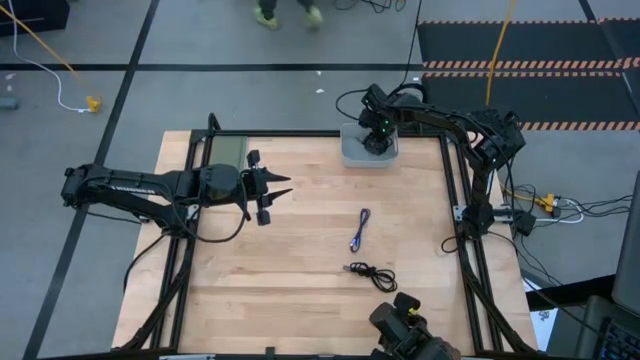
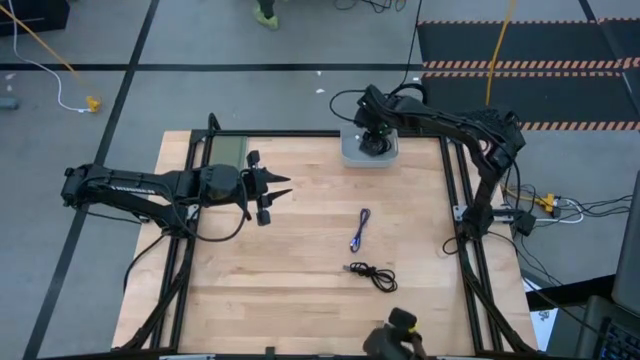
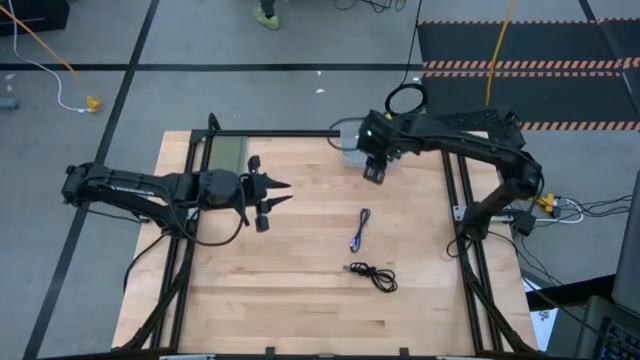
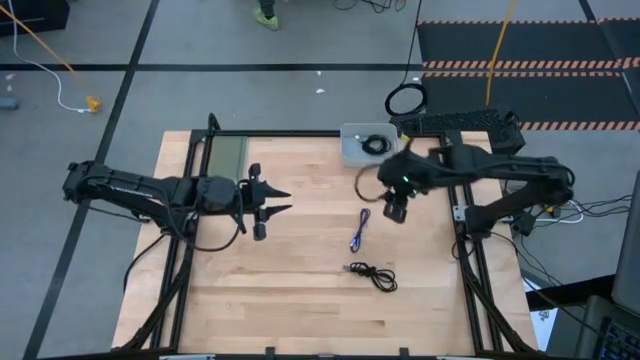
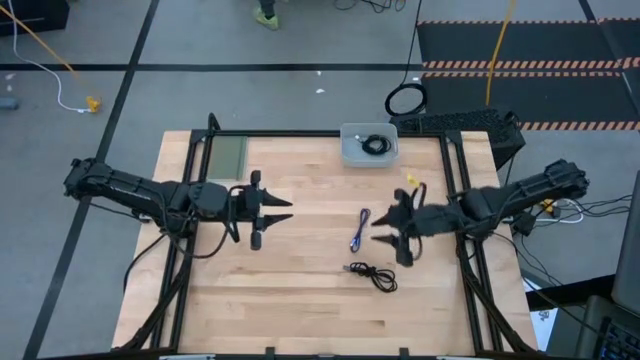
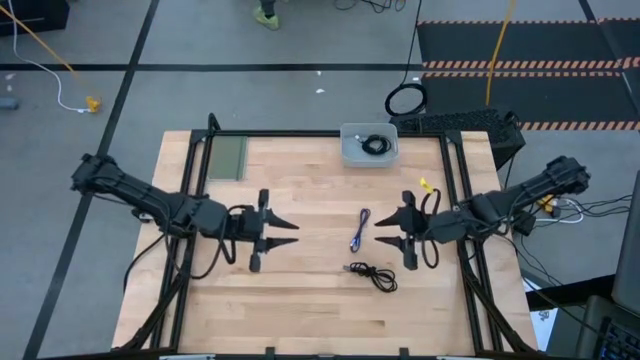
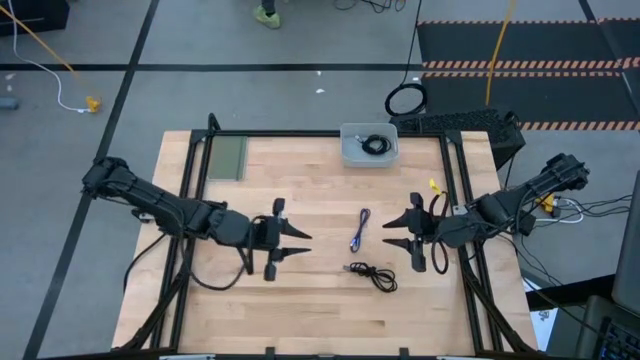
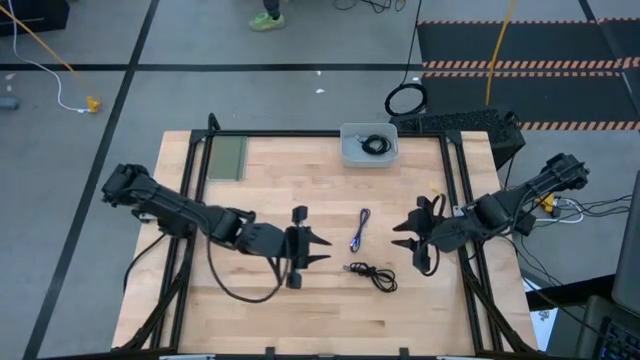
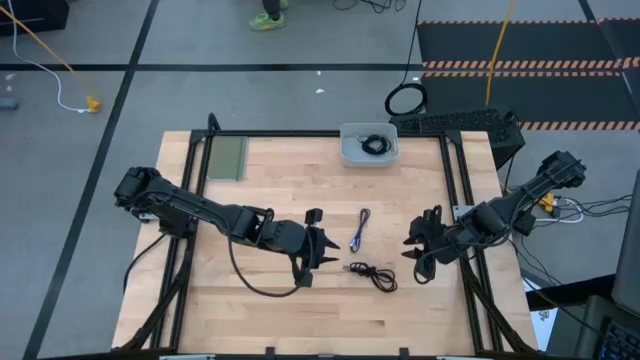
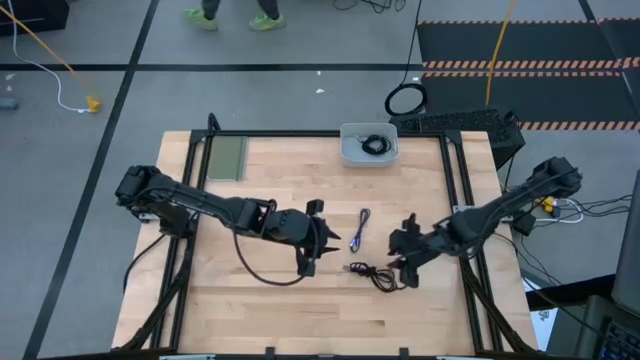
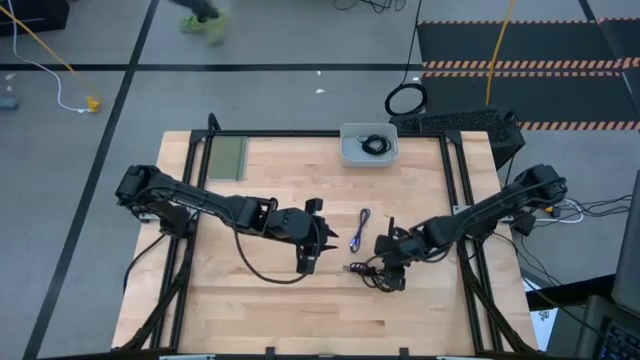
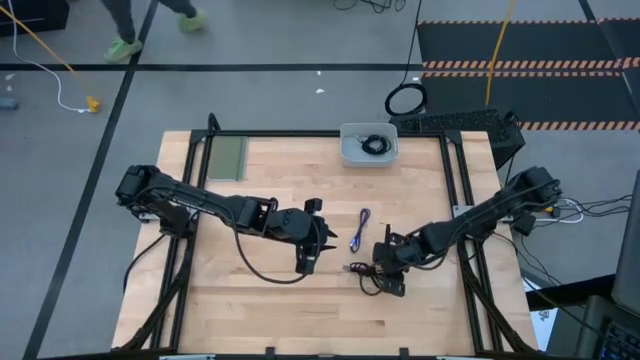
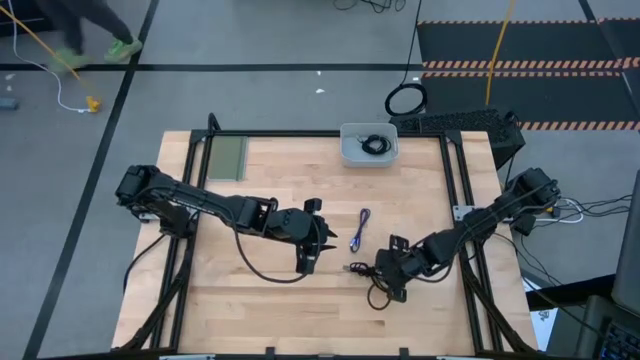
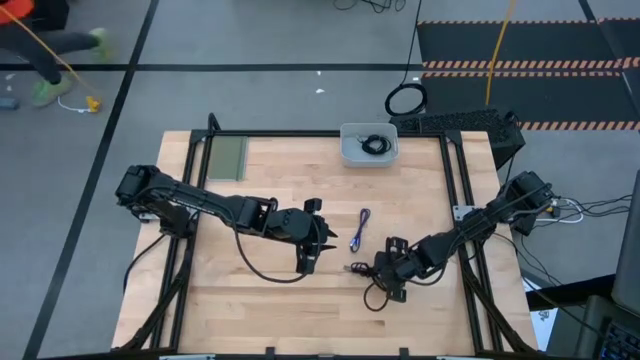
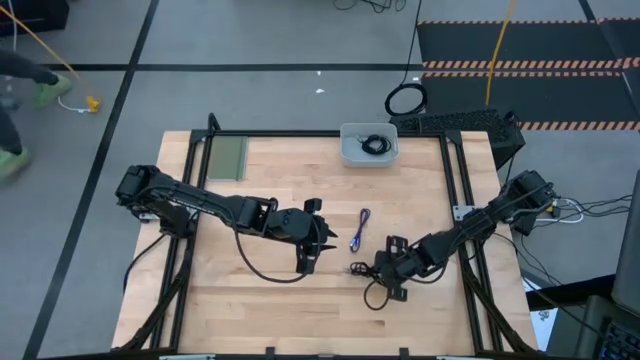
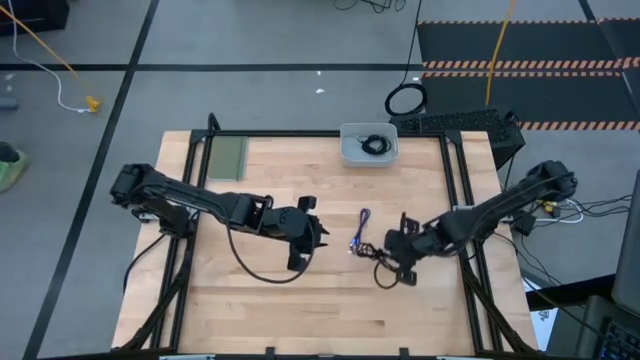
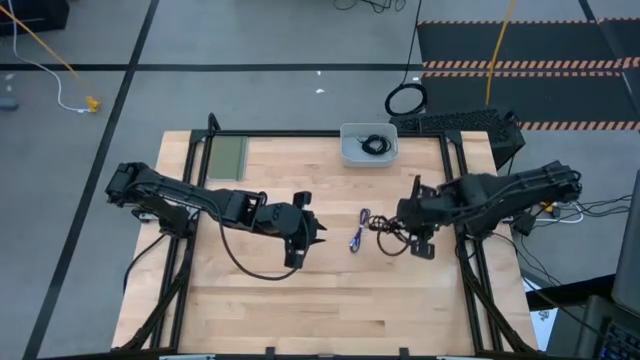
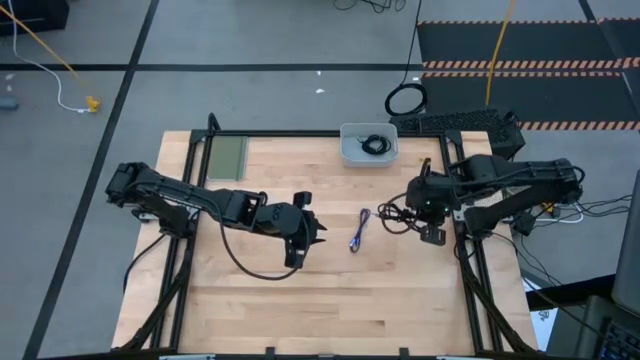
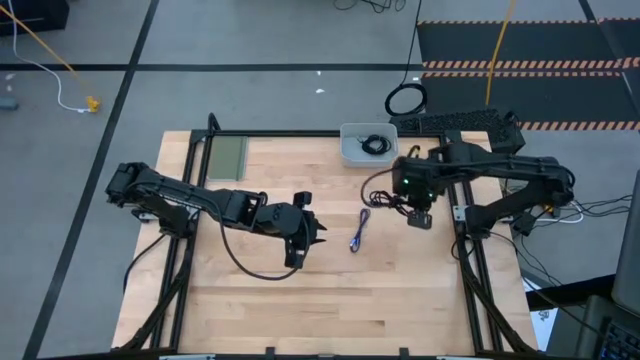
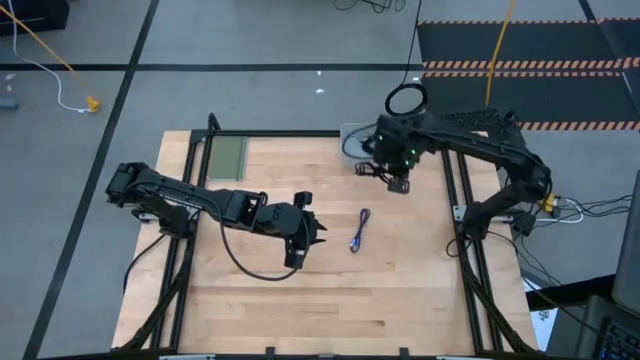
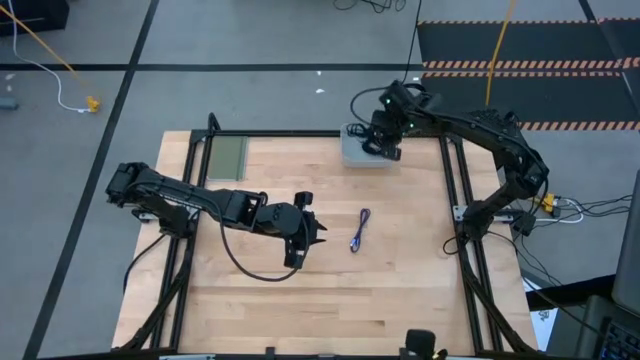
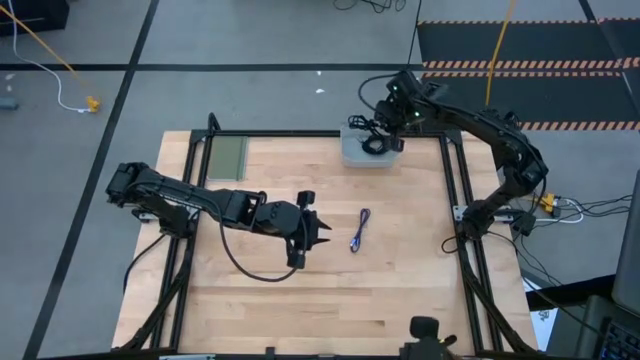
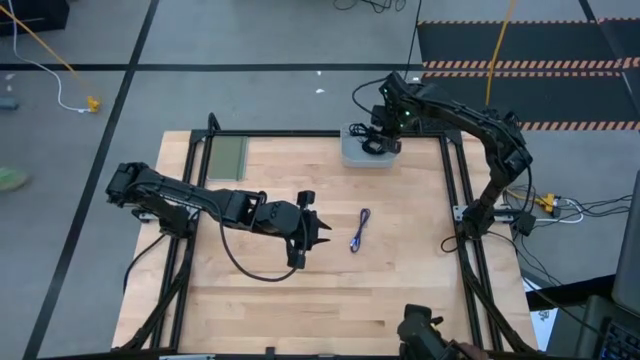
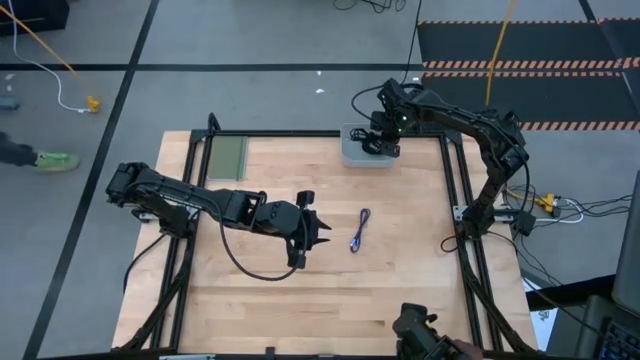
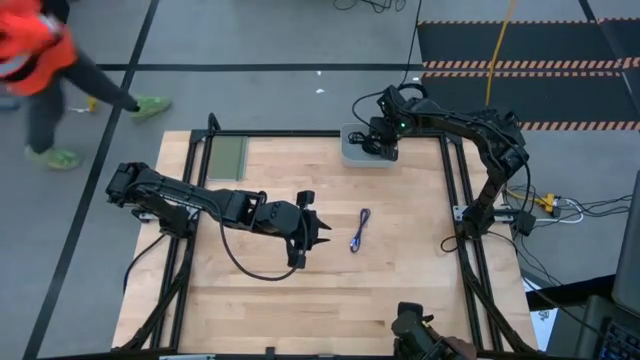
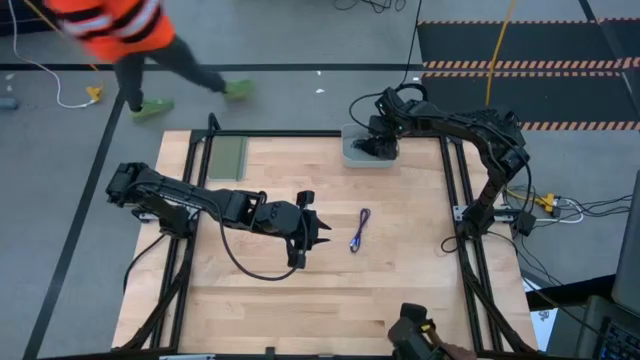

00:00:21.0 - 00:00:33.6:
Task: Pick and place USB-C Cables
Put the black charger cable into the white bin

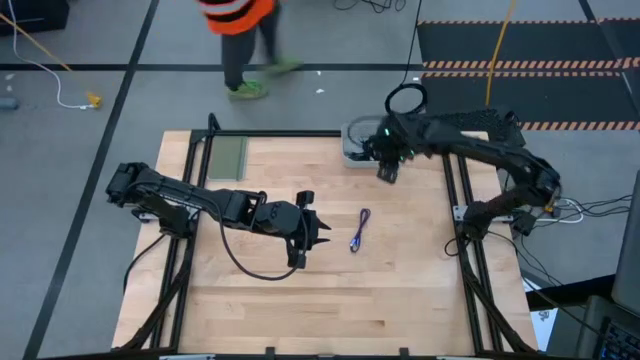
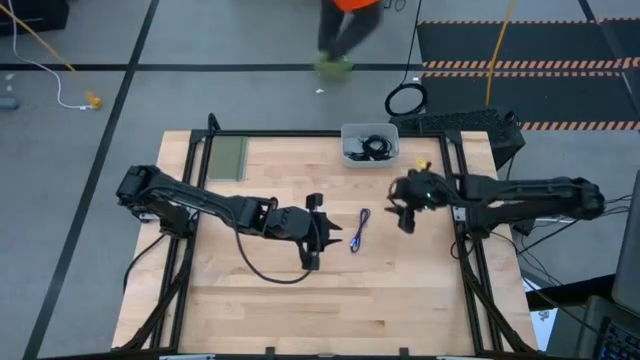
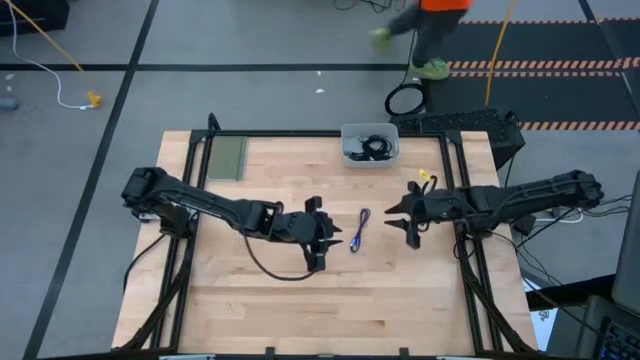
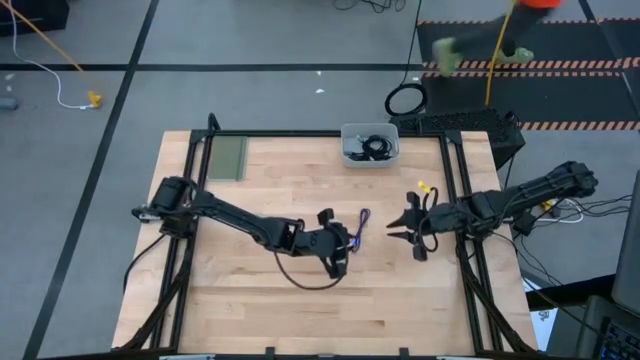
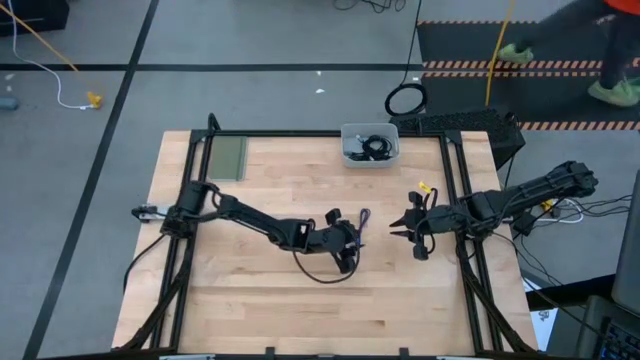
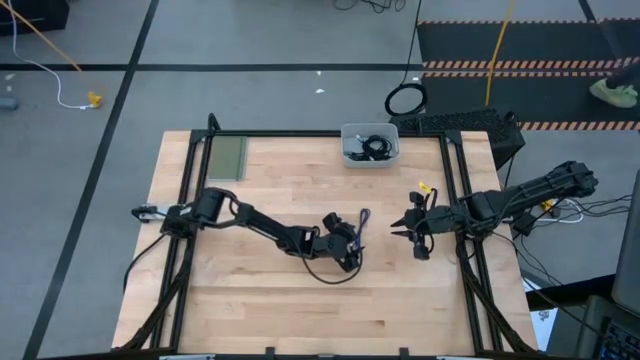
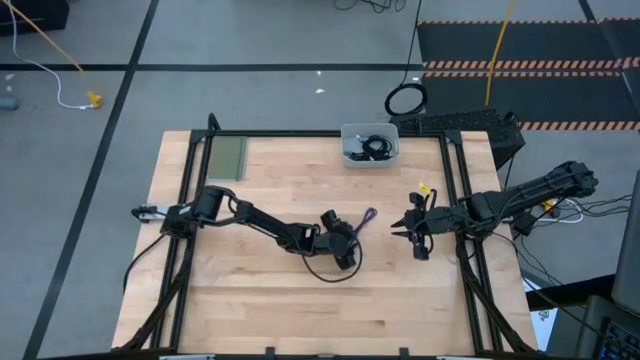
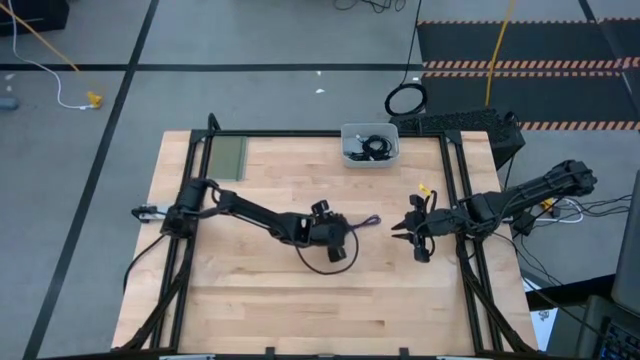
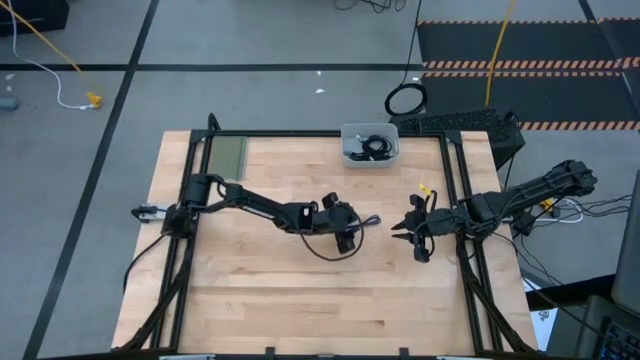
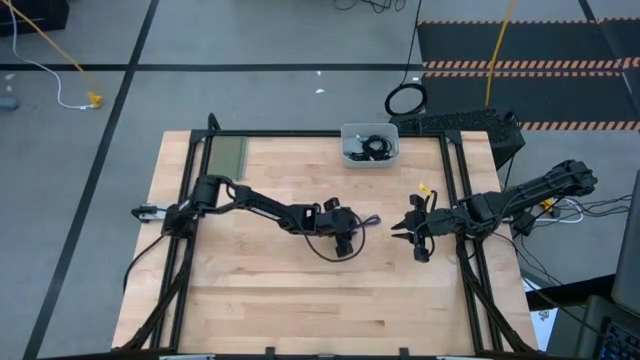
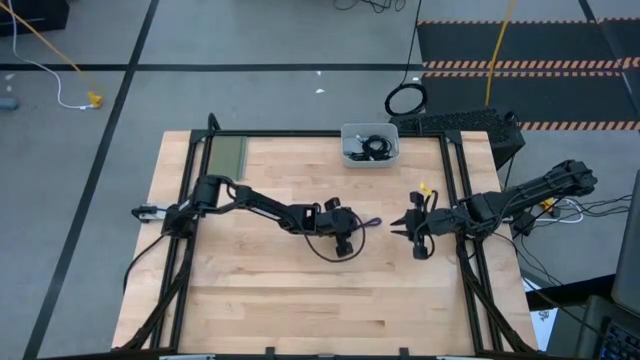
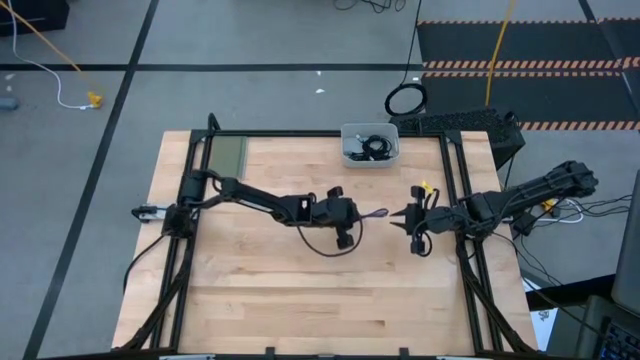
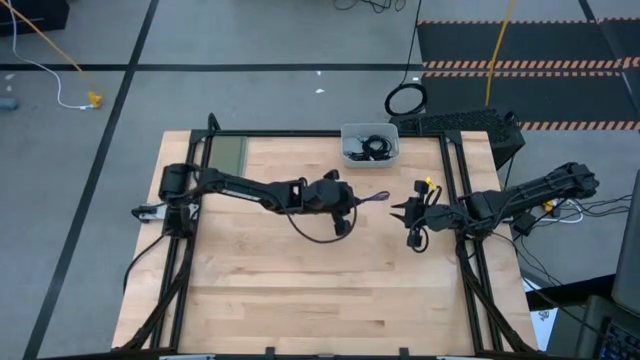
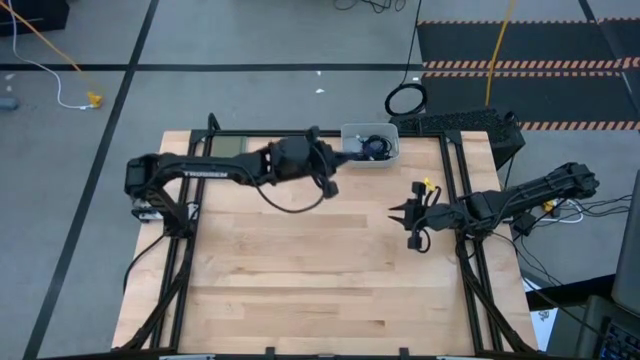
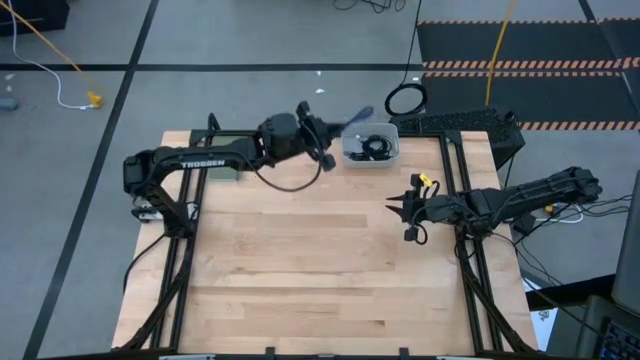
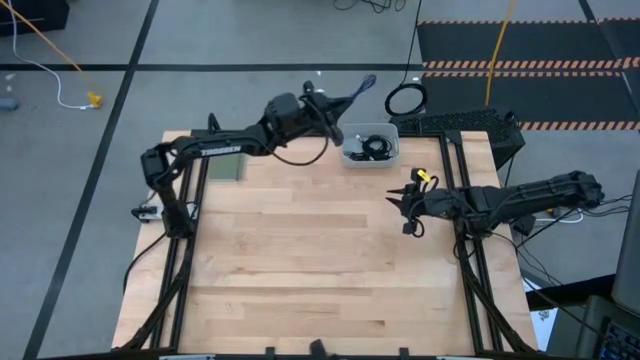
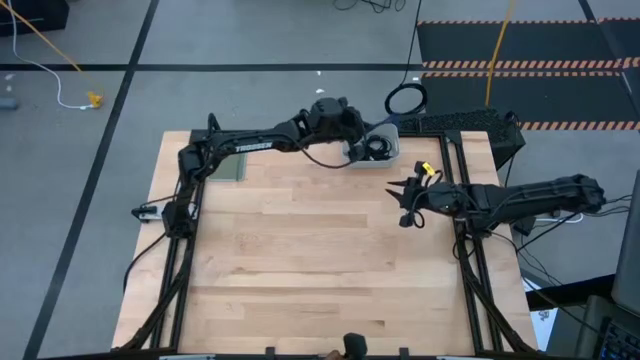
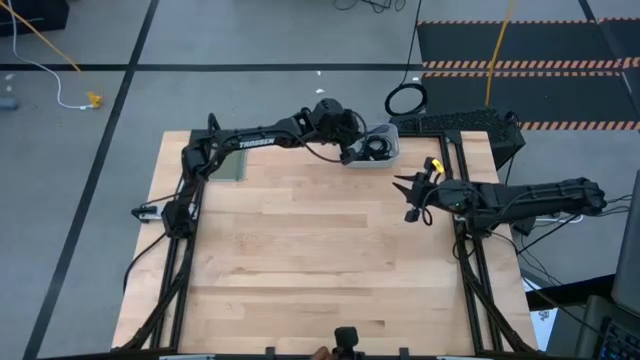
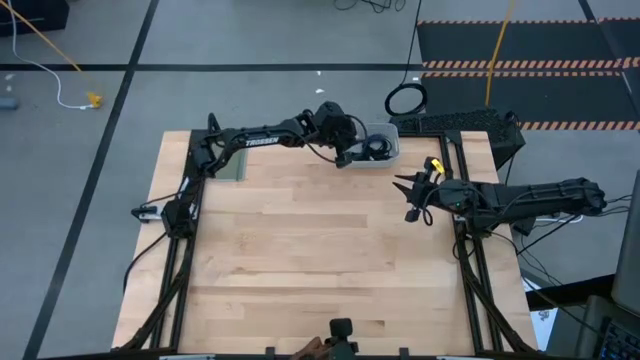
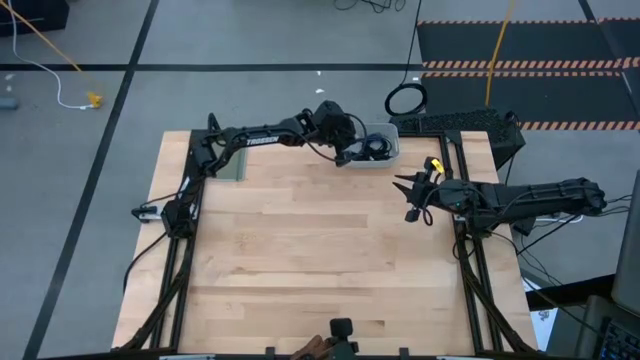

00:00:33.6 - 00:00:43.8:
Put the blue charger cable into the white bin
